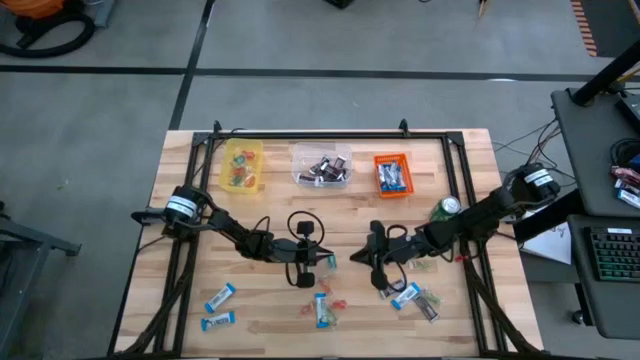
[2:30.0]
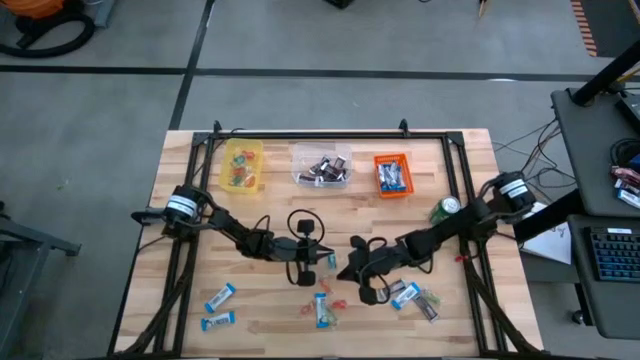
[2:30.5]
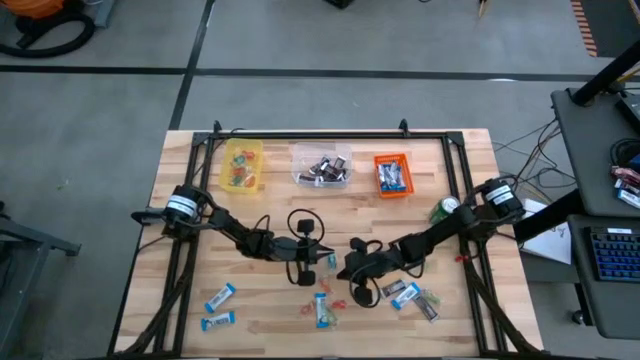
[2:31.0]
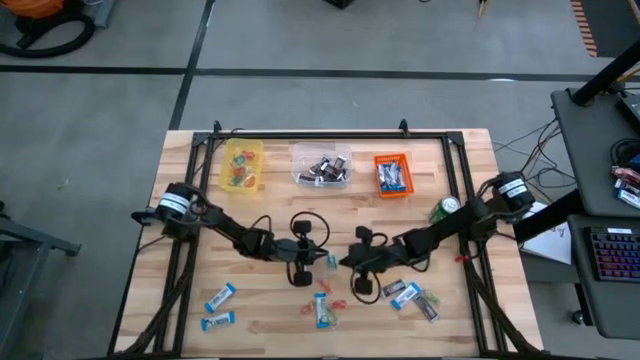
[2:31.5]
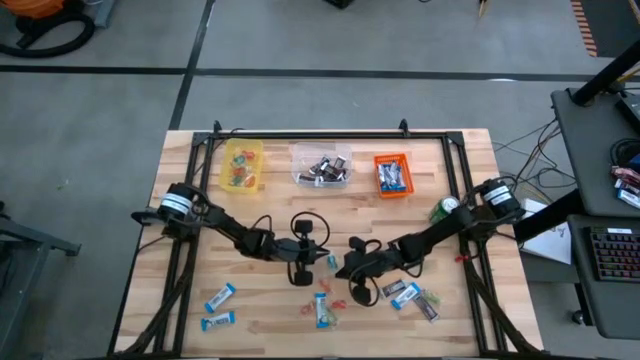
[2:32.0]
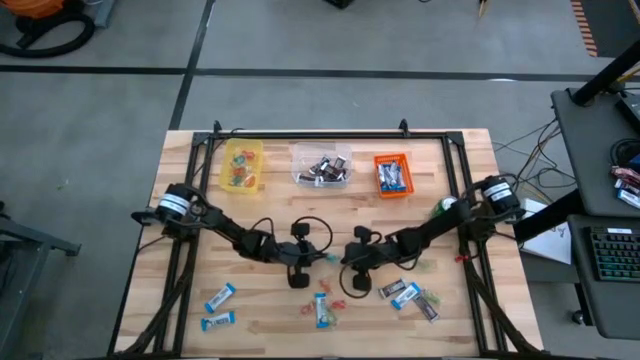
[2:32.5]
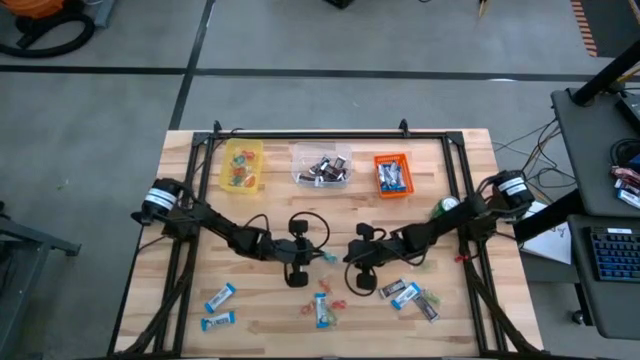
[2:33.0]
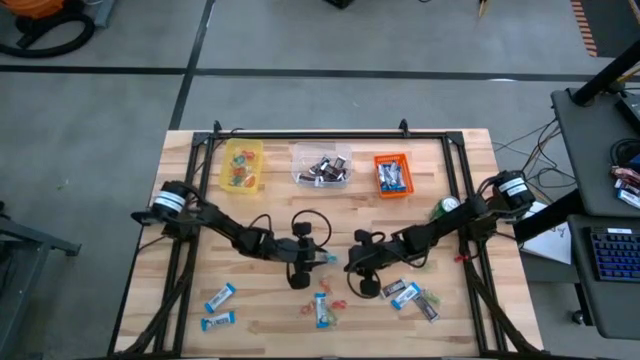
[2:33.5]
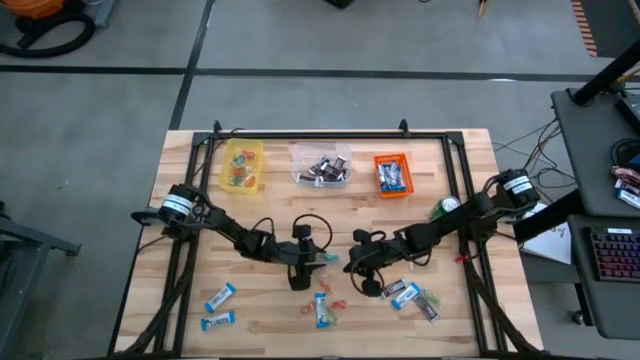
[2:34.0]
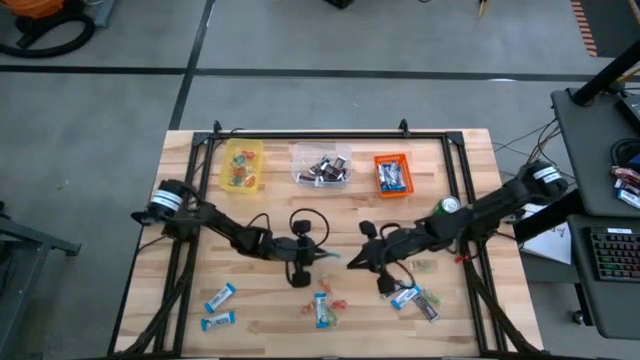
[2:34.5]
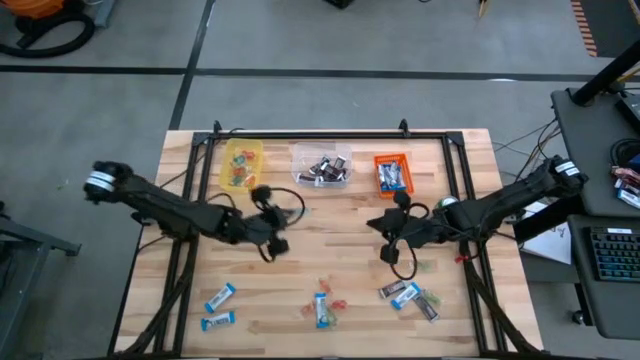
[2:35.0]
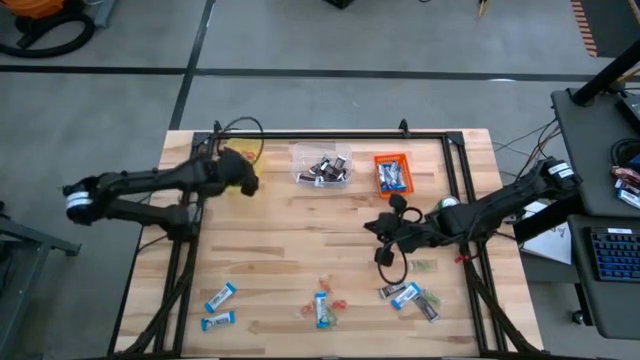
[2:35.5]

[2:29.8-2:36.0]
Task: Organize candy in baskets
Put the blue gummy into the yellow bin

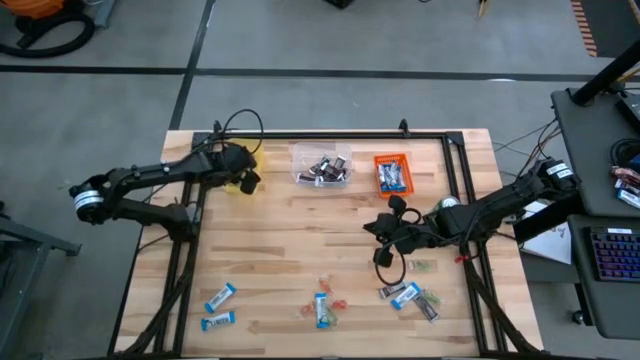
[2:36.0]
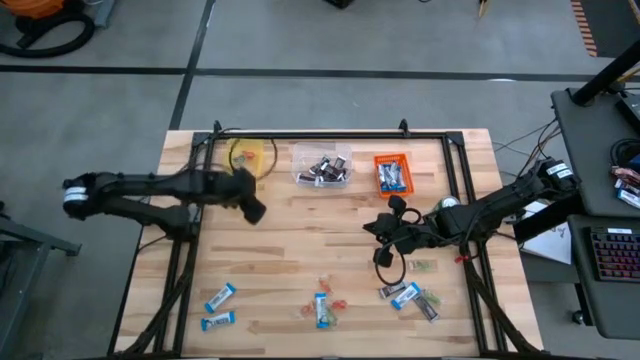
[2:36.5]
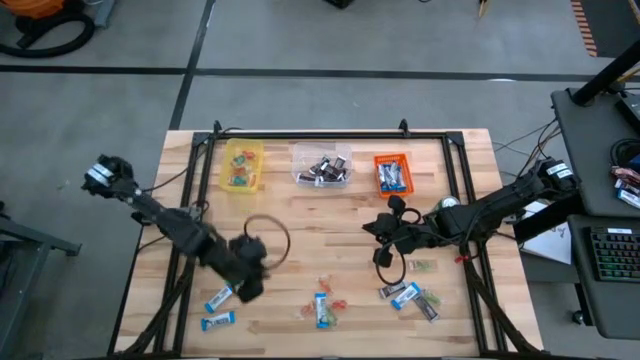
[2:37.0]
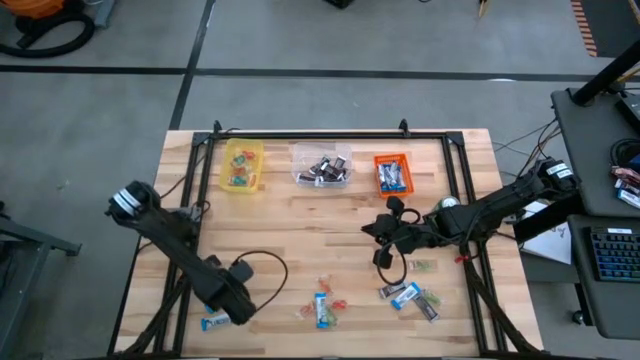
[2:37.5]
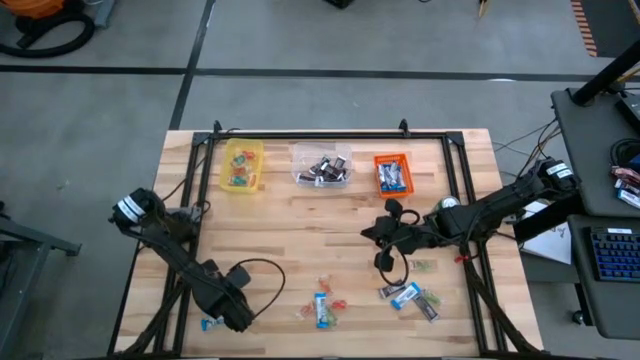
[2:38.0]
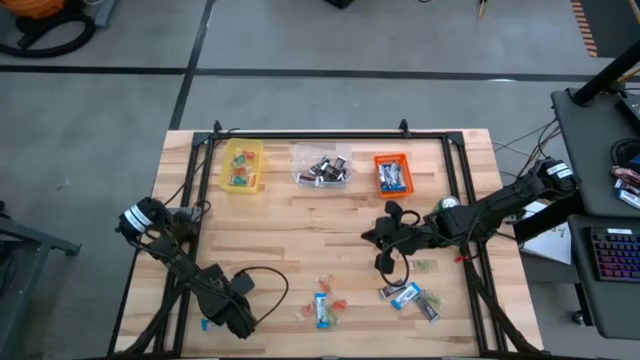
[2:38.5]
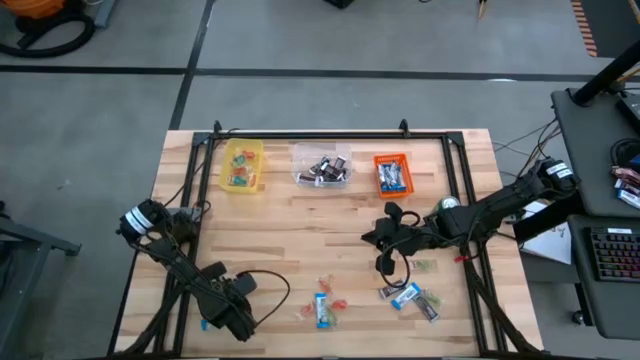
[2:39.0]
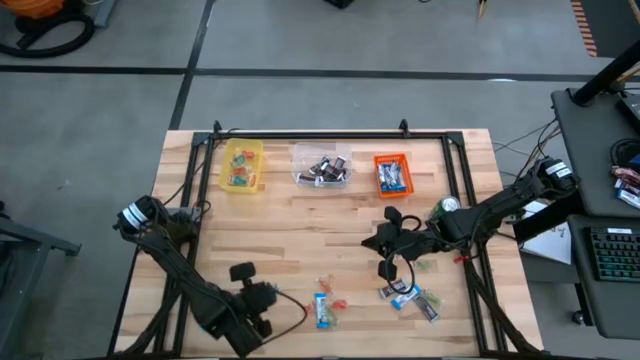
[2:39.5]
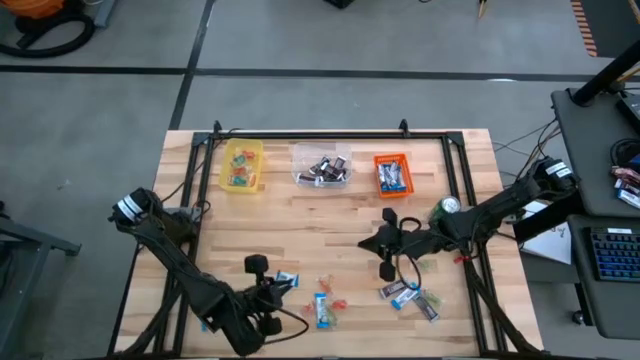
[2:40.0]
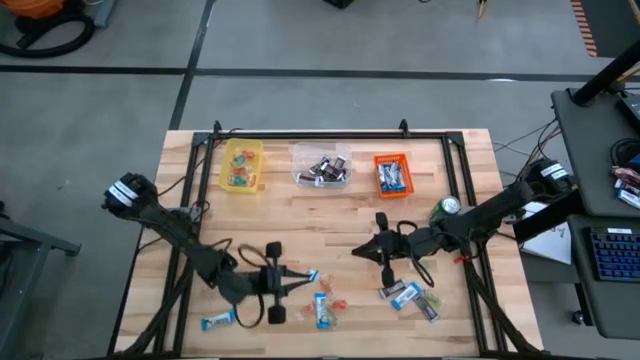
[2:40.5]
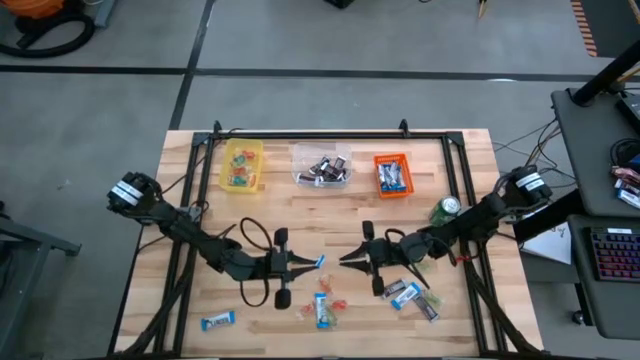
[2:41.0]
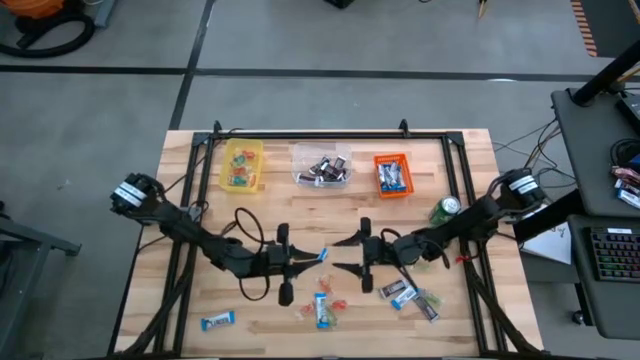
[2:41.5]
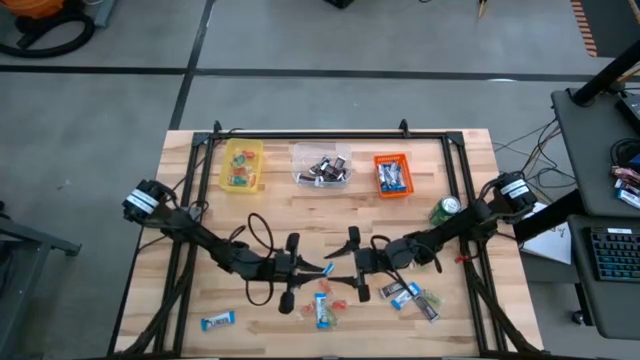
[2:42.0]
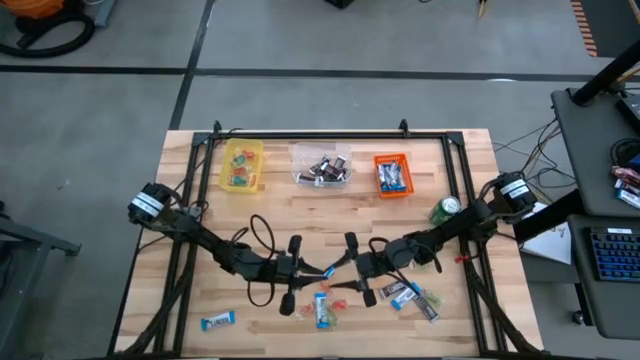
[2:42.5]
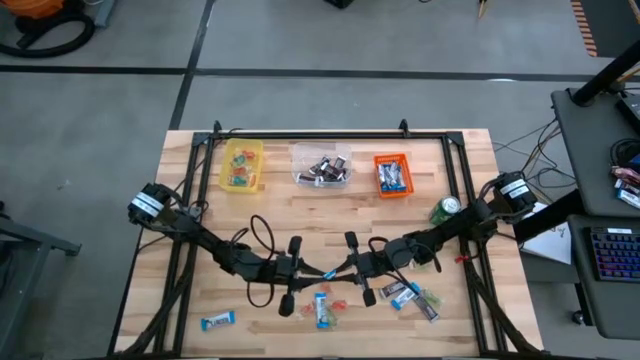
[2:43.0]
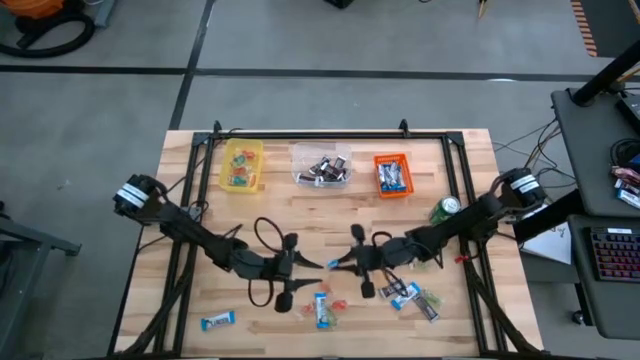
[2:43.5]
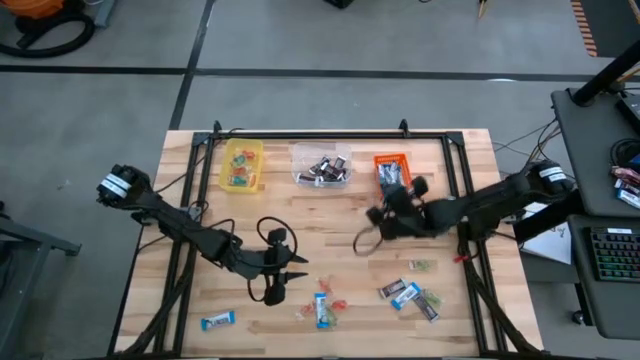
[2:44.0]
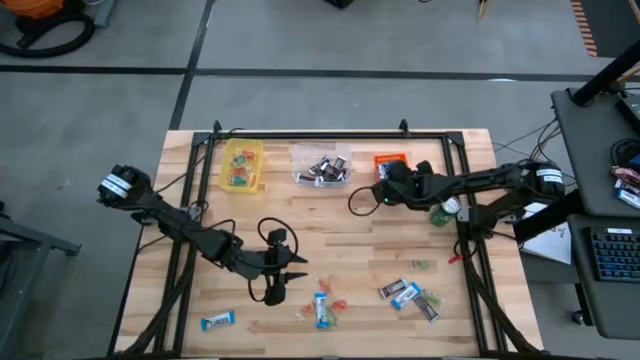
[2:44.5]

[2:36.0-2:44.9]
Put the white chocolate bar chocolate into the orange bin

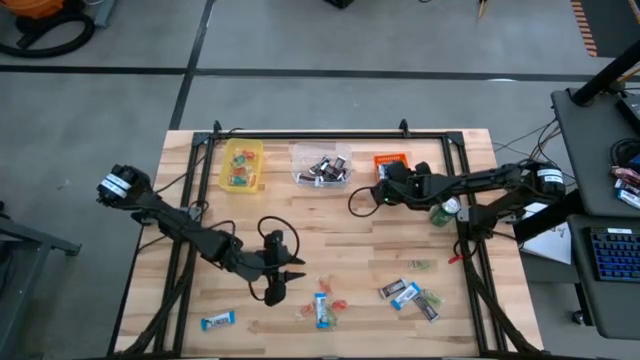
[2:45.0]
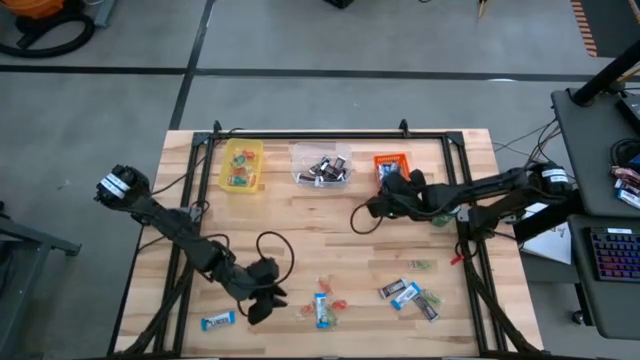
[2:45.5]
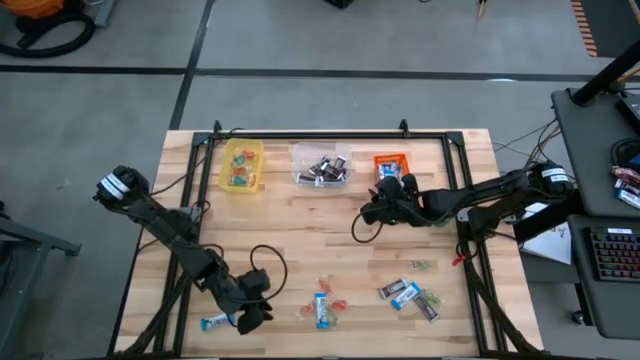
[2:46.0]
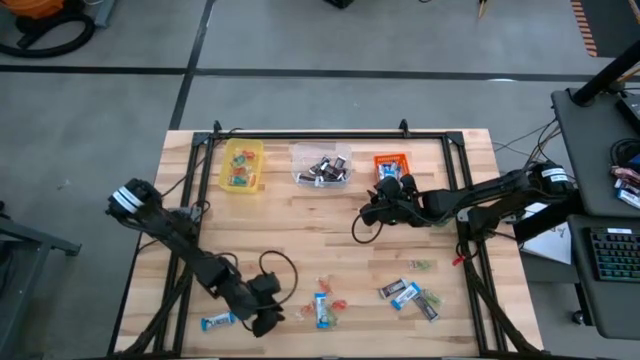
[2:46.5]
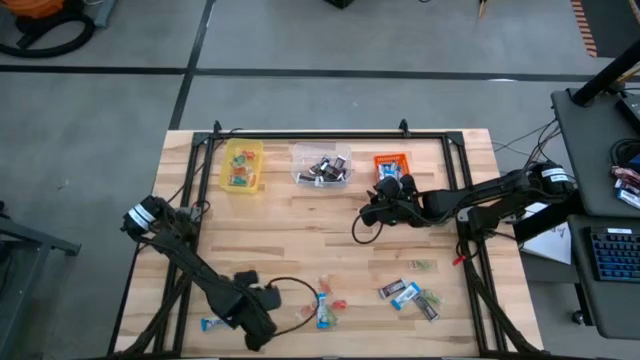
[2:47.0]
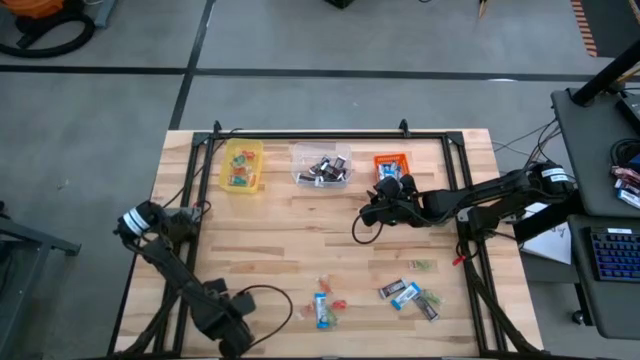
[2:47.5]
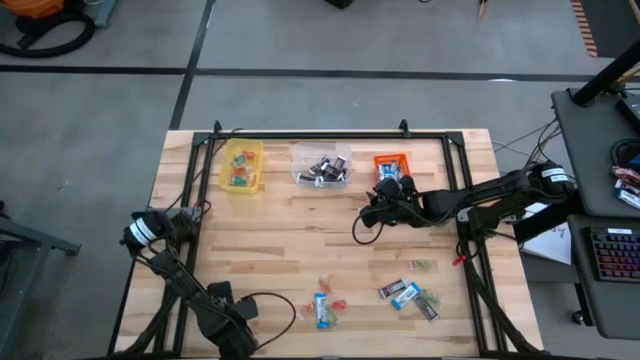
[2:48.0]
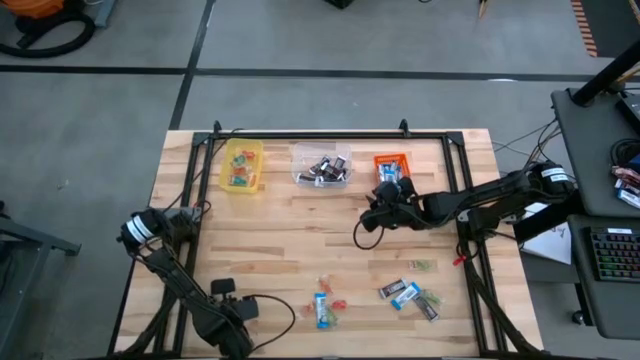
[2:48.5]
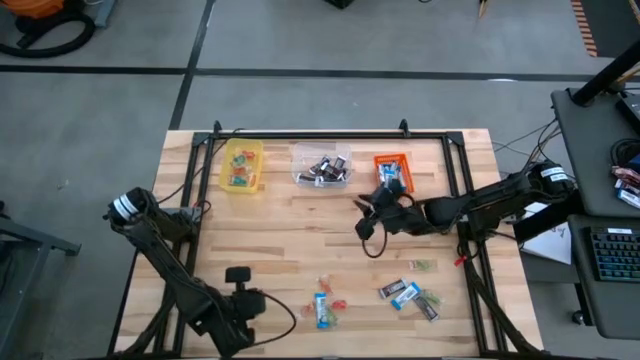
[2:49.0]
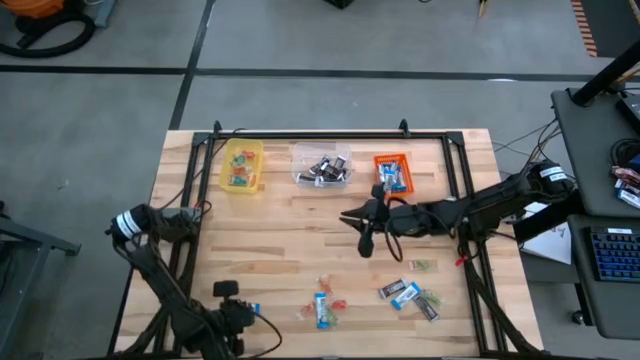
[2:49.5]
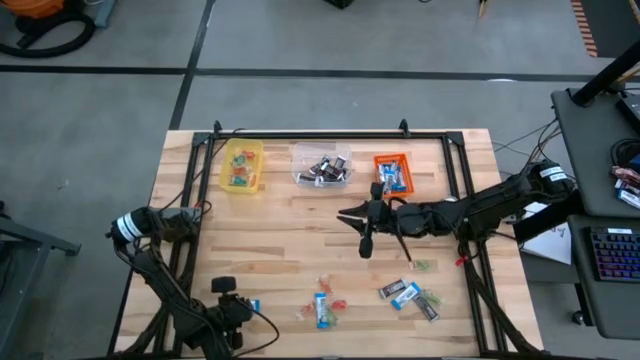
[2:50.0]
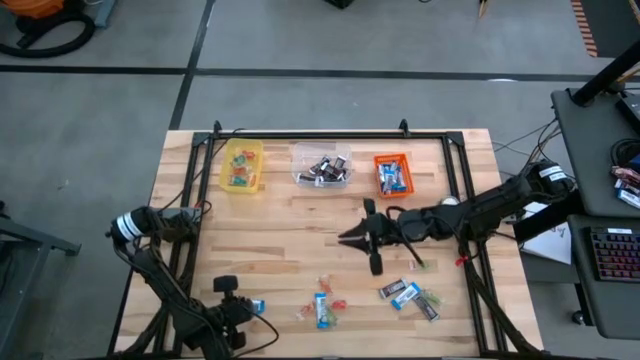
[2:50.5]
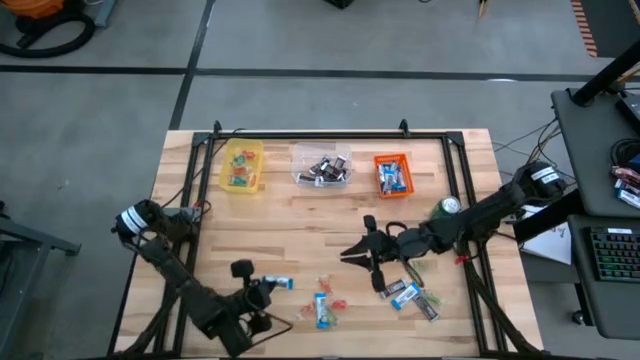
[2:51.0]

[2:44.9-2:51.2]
Put the white chocolate bar chocolate into the orange bin
